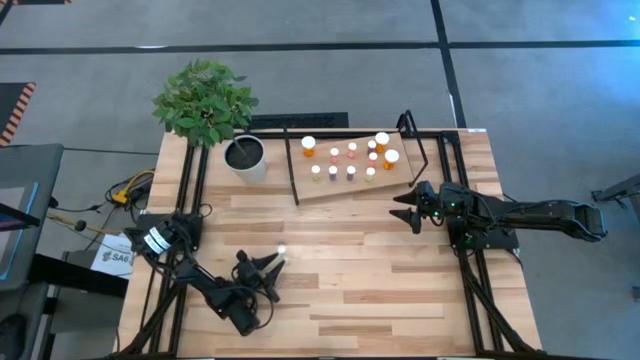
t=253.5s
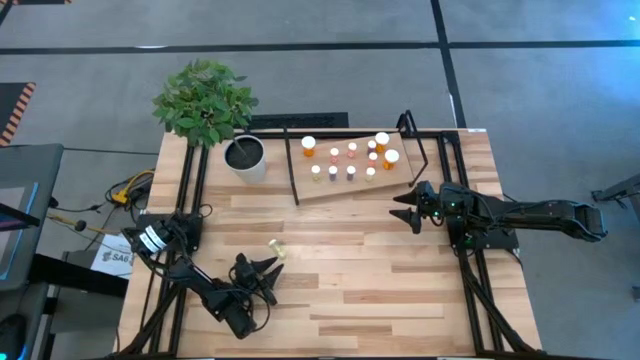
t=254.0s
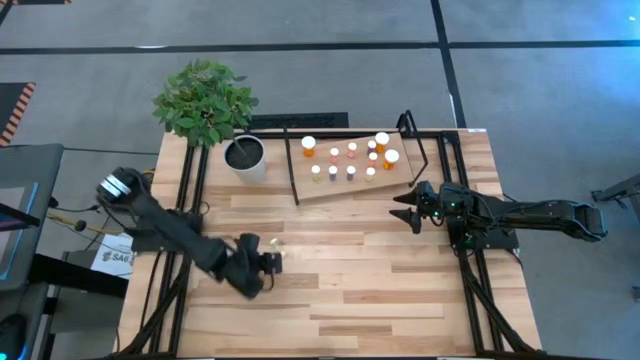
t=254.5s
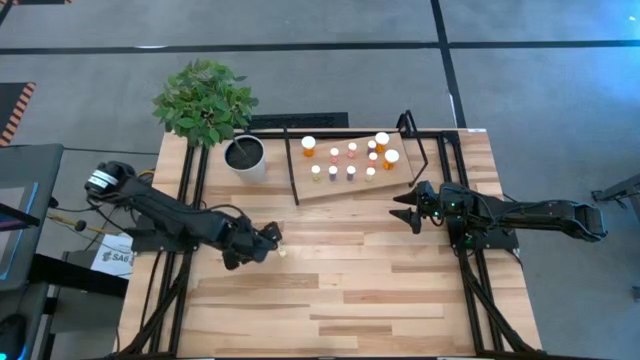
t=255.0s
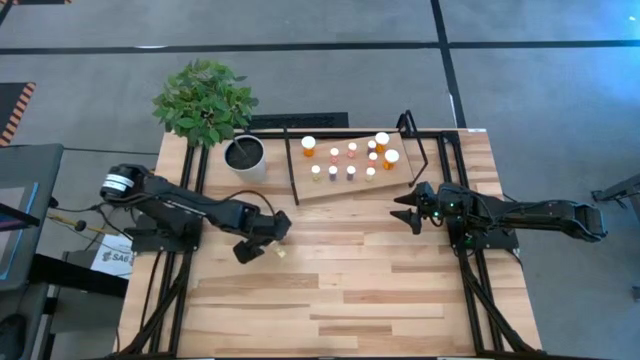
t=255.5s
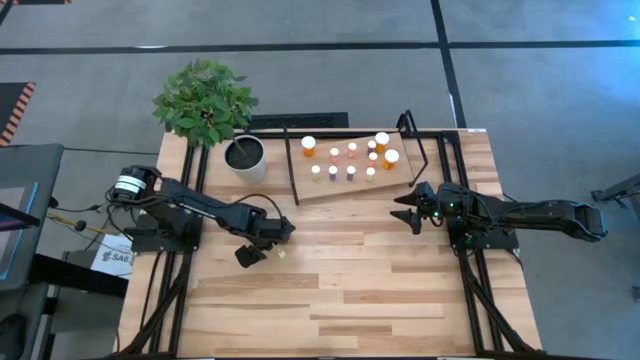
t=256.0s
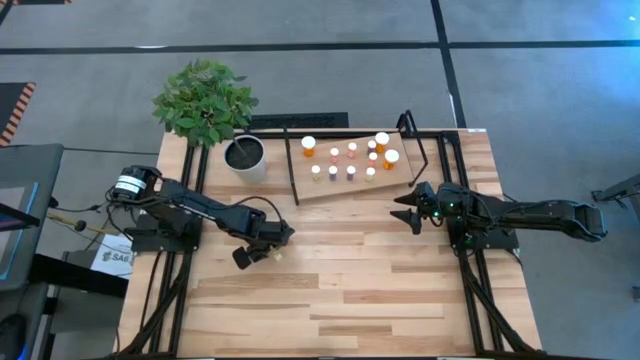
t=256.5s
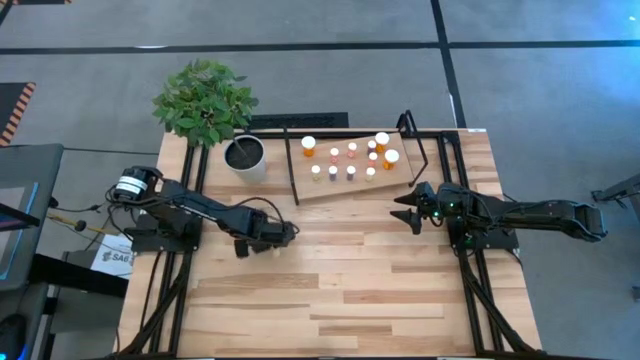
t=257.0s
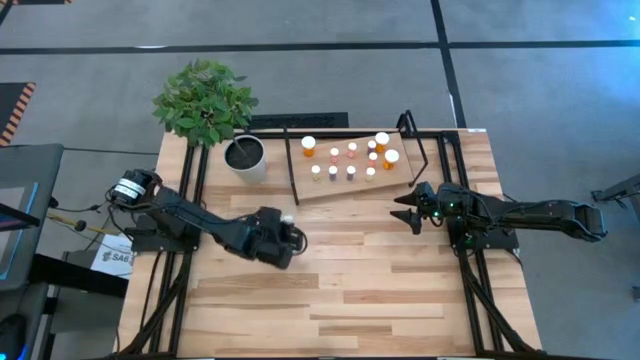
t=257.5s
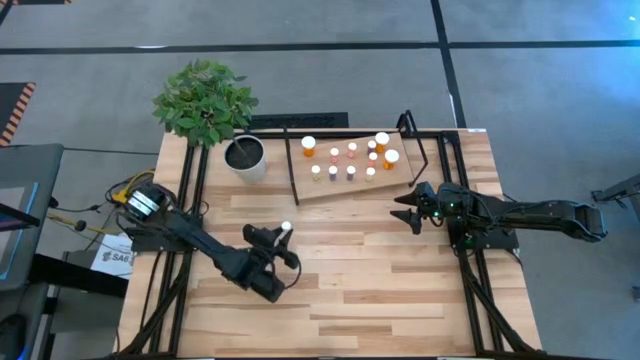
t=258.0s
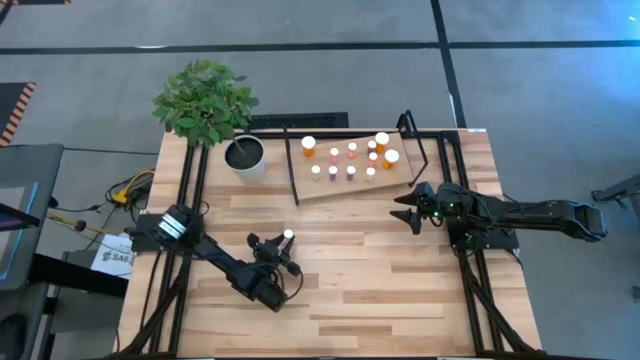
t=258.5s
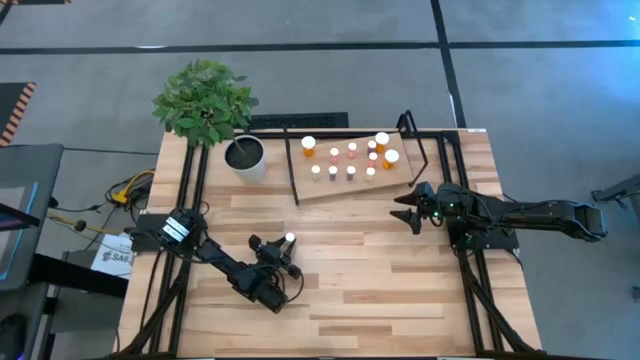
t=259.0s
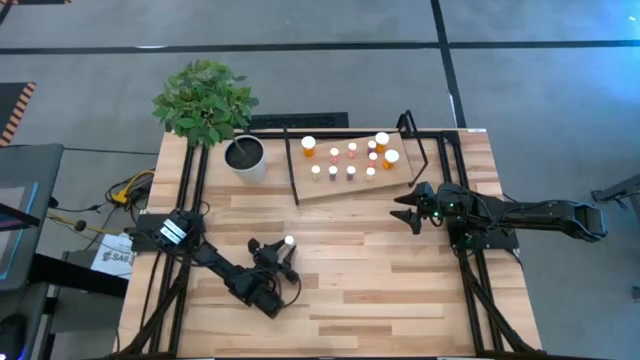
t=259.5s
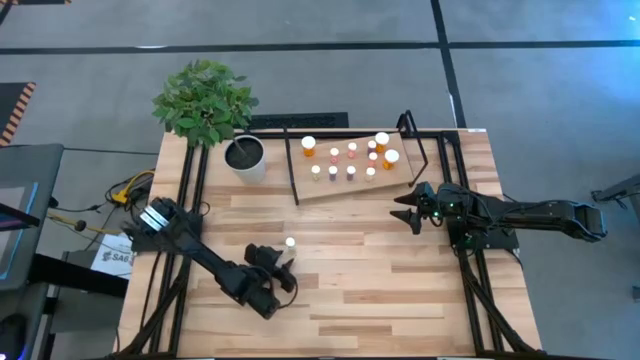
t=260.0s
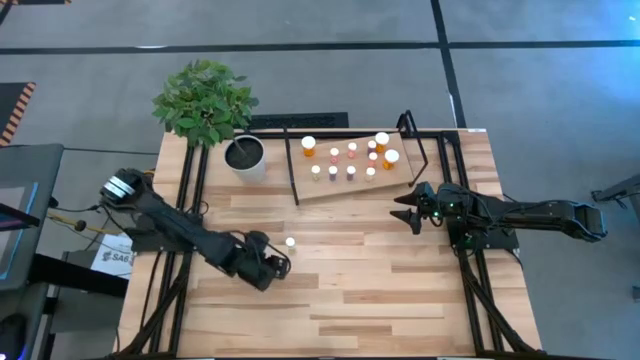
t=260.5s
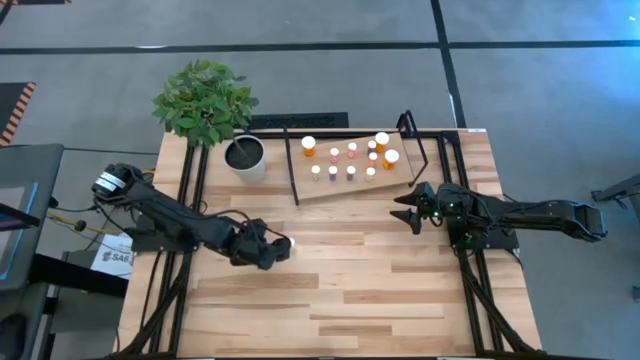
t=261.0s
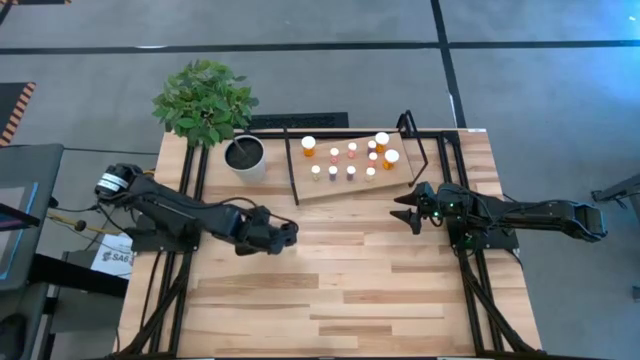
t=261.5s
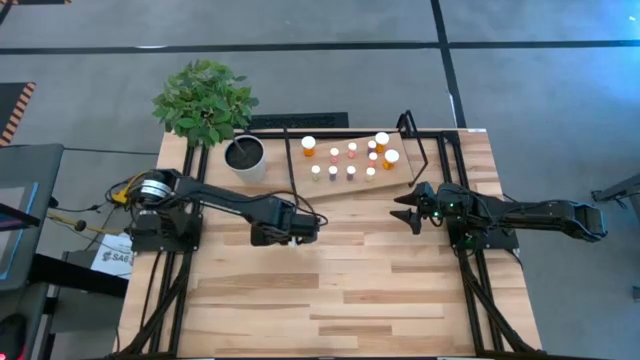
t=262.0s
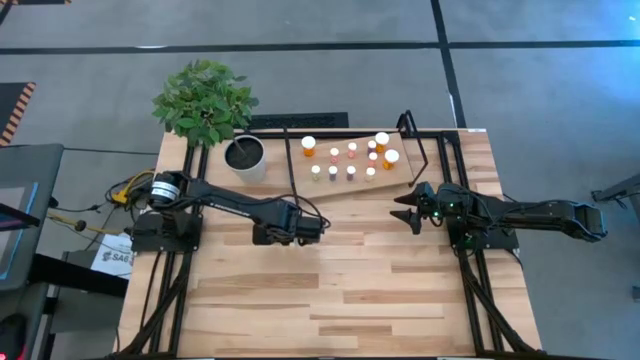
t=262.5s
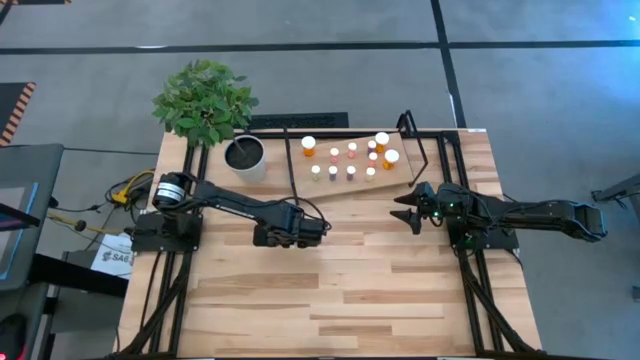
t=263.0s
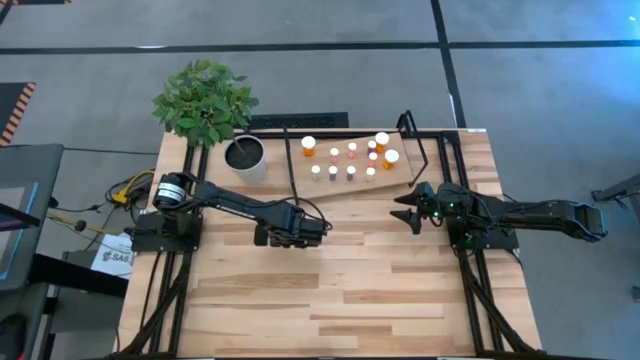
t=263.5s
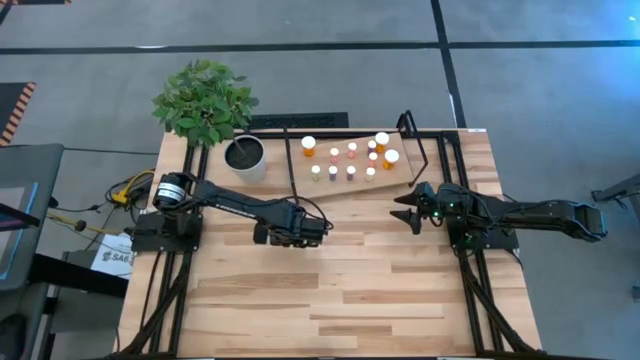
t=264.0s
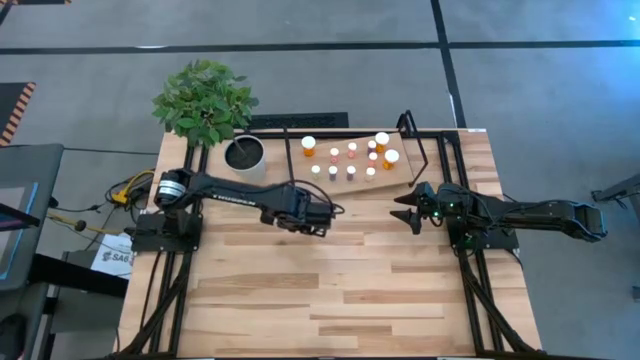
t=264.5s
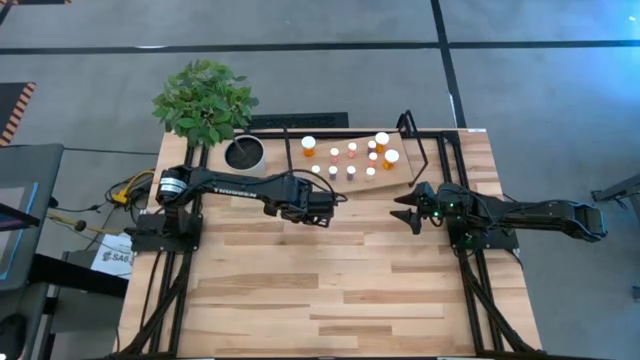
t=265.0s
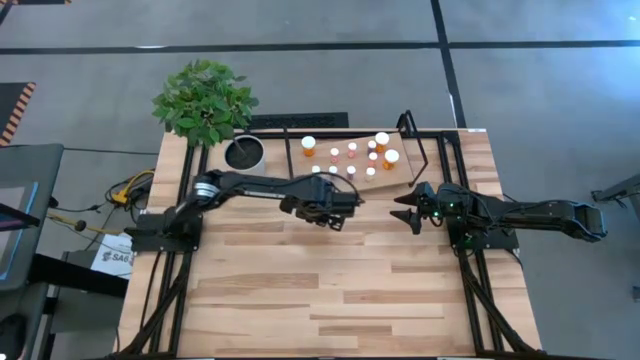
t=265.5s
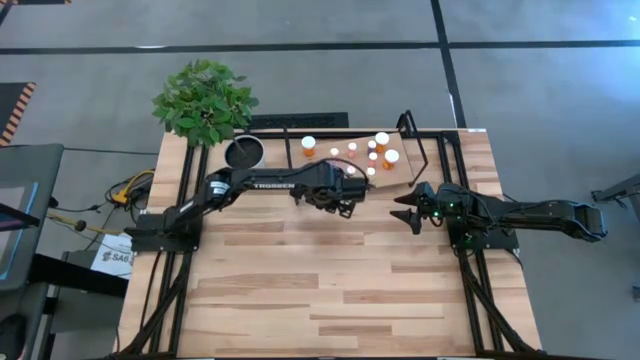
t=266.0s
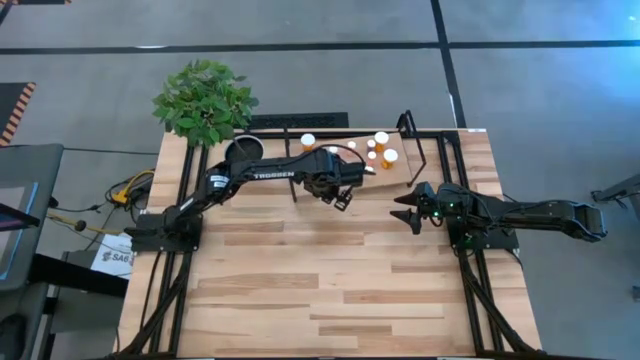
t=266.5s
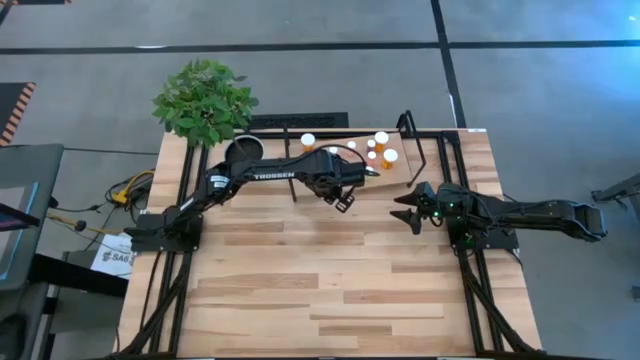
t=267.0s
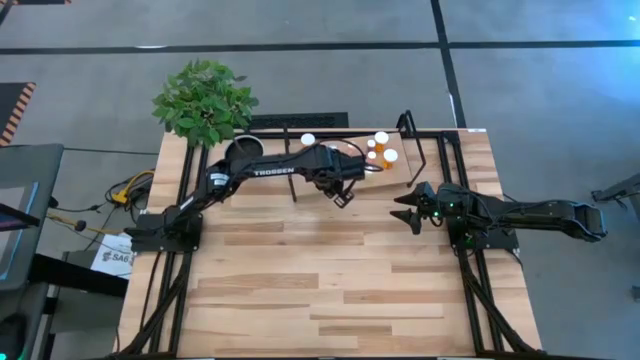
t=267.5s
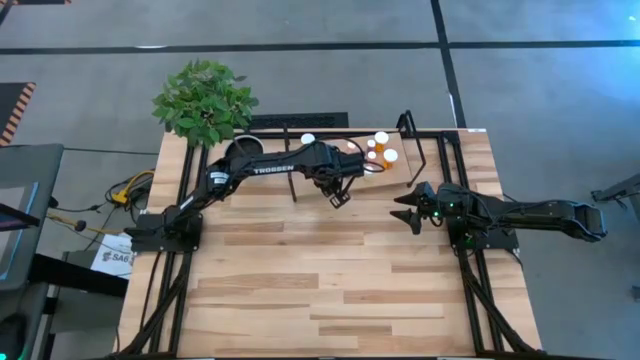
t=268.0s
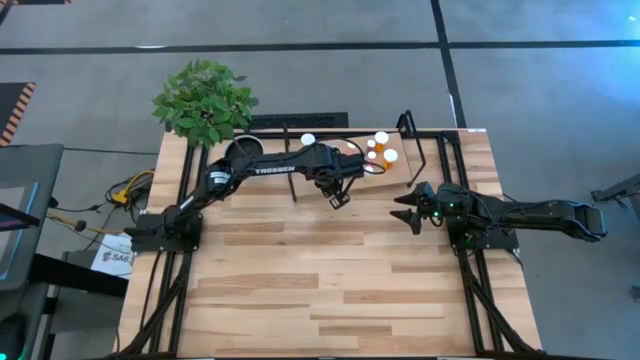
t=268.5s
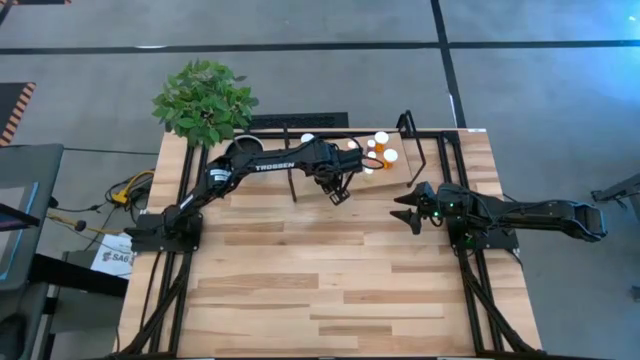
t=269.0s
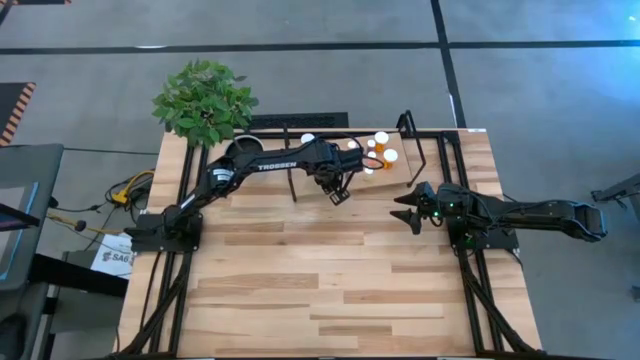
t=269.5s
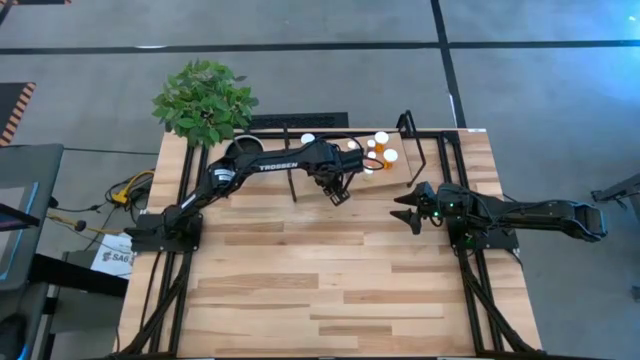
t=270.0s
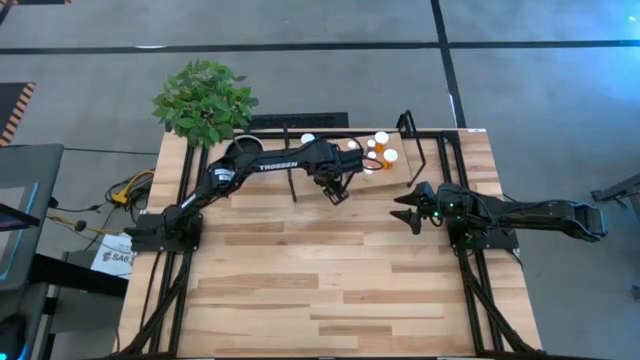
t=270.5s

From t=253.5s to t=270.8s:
Task: Pick and place medicine bottles onto shelf by color
Put the yellow pill bottle on the shelf

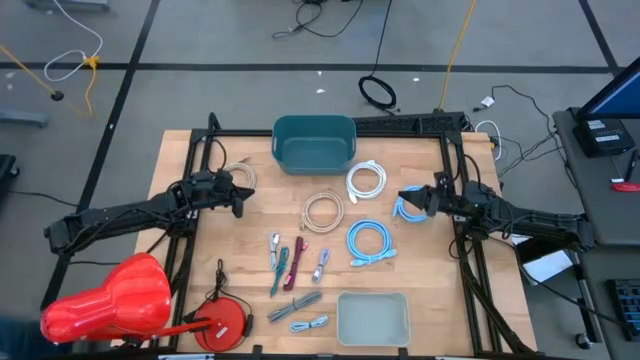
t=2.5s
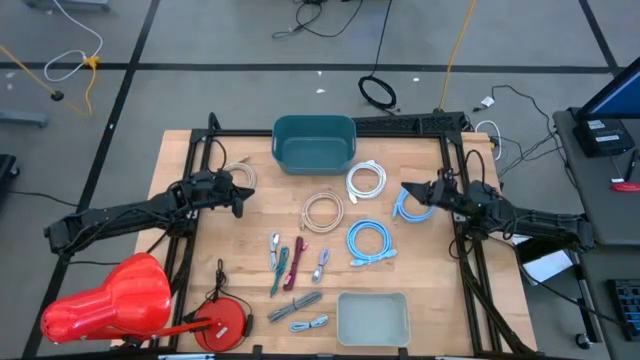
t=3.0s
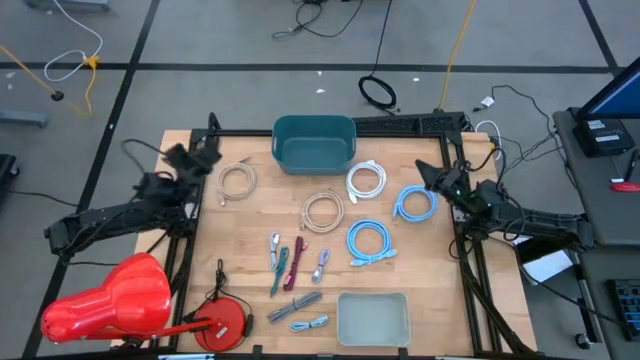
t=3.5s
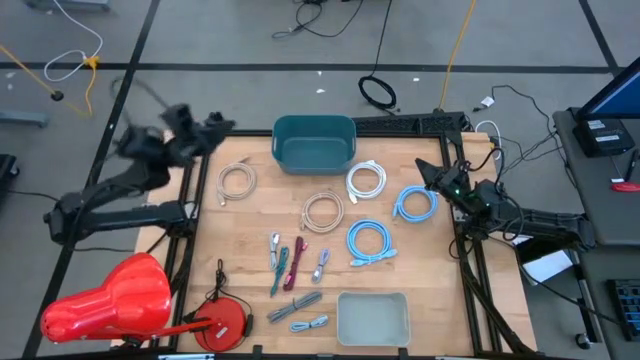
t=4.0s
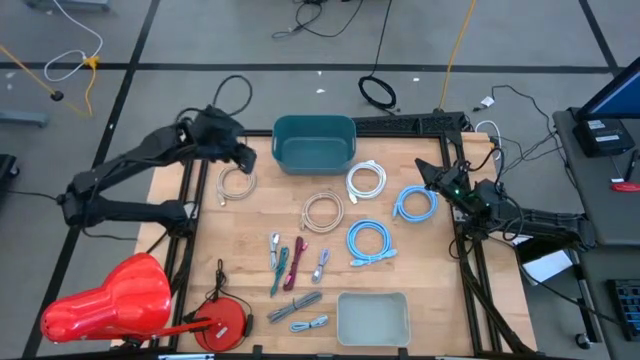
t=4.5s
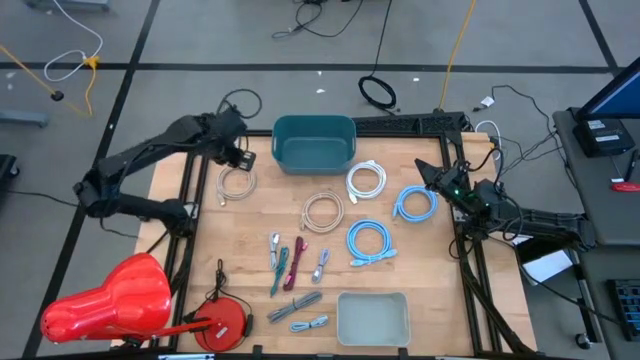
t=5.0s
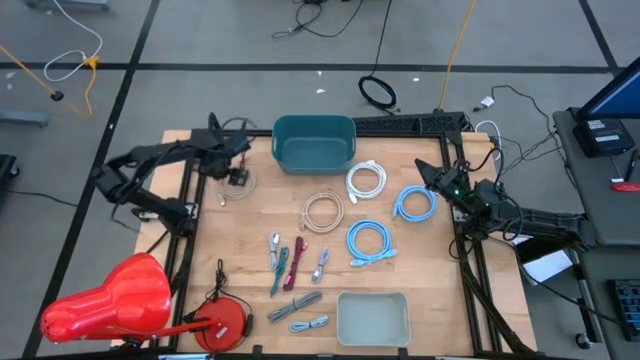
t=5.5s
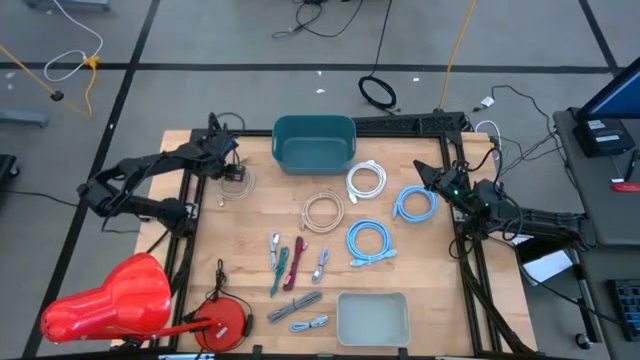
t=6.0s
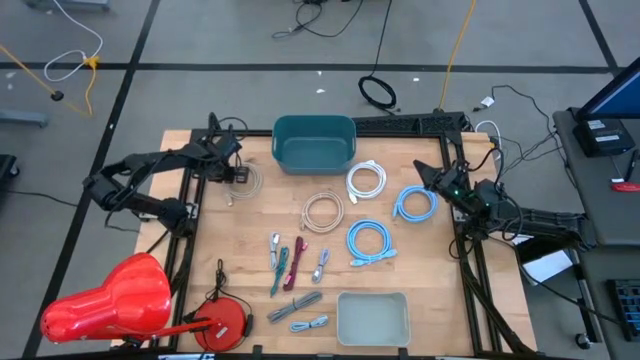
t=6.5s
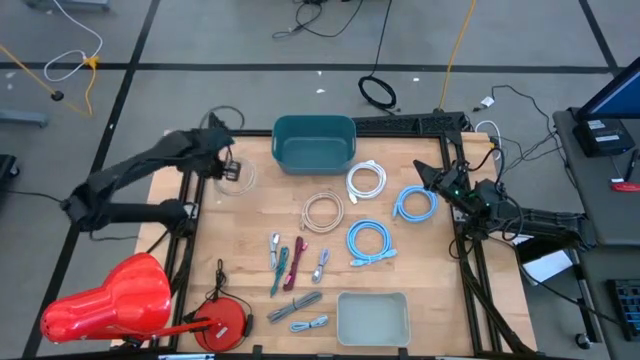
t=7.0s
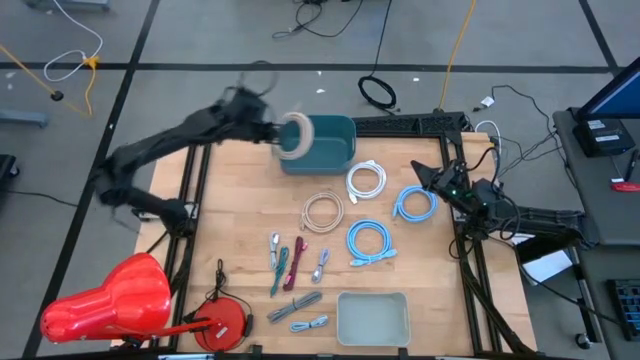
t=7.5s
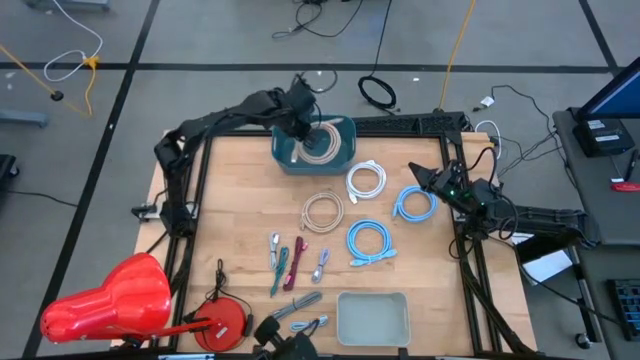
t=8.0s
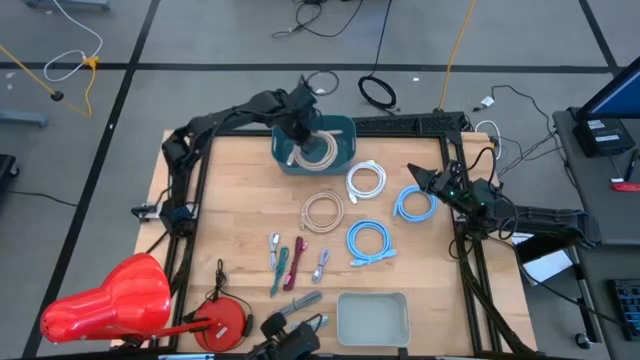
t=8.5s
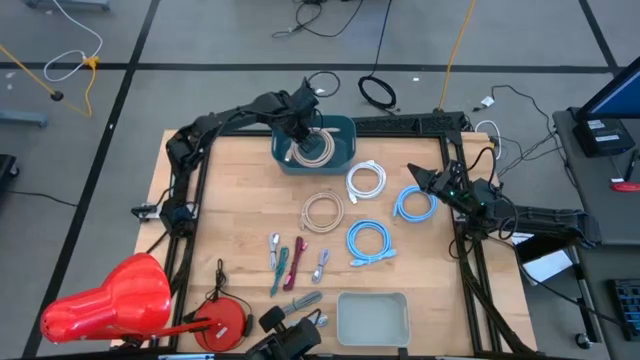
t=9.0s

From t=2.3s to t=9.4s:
Task: Pick & Place USB Port
Put the left light brown HDMI cable into the blue bin
